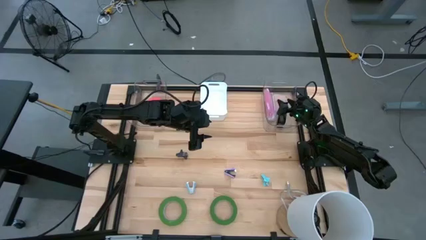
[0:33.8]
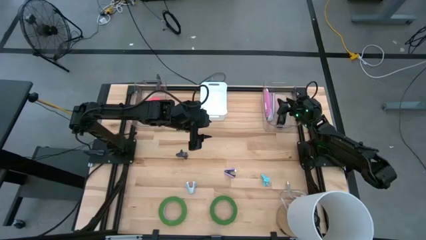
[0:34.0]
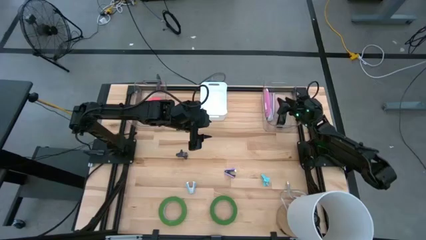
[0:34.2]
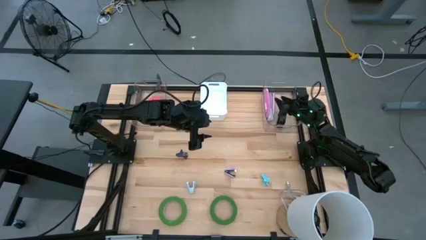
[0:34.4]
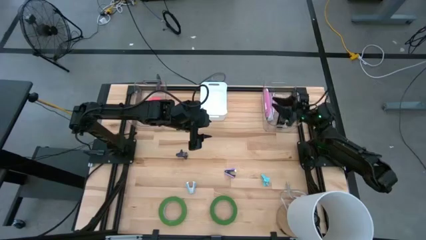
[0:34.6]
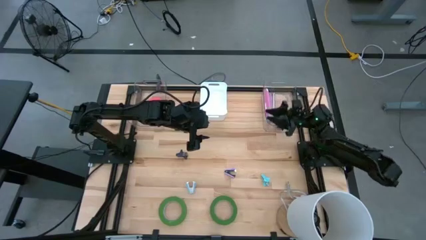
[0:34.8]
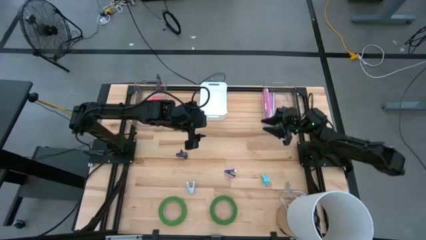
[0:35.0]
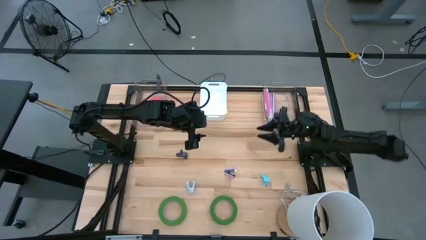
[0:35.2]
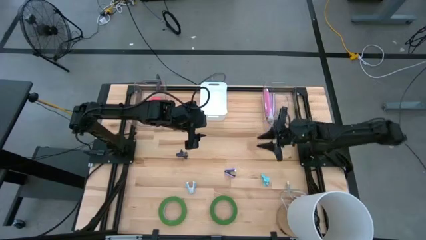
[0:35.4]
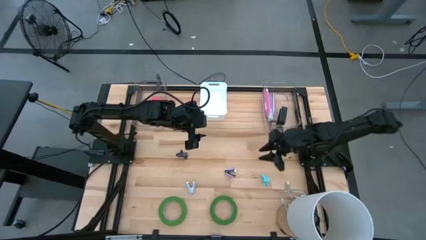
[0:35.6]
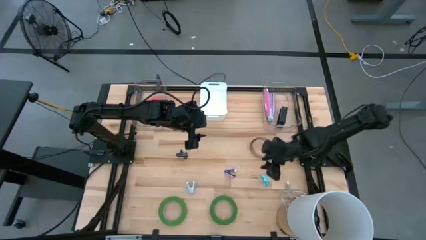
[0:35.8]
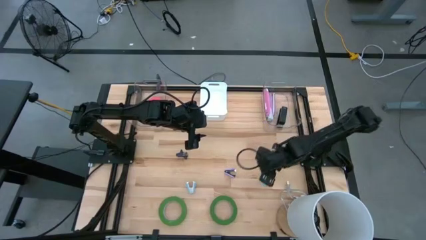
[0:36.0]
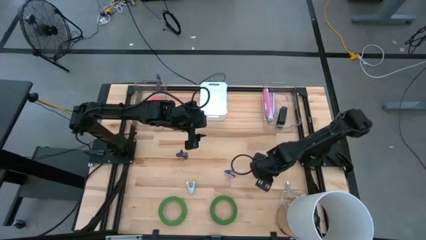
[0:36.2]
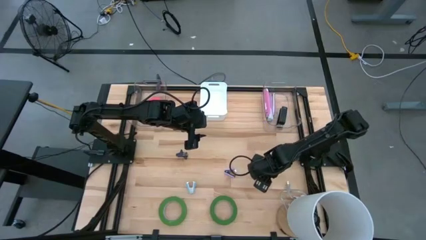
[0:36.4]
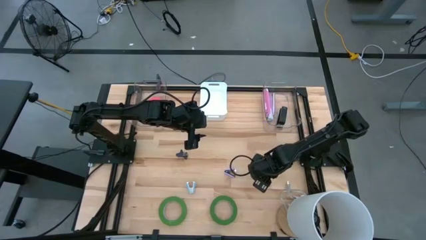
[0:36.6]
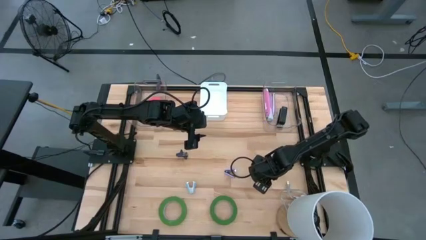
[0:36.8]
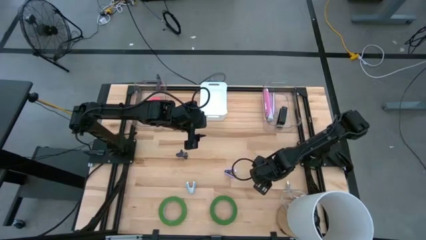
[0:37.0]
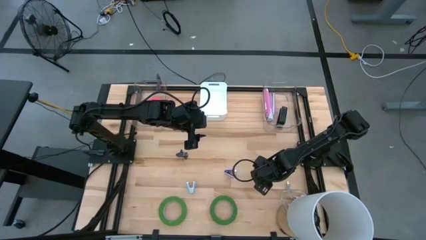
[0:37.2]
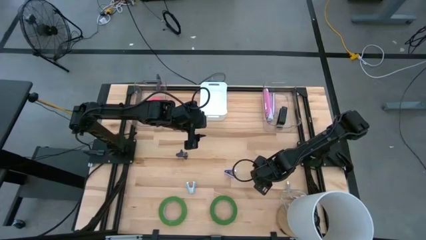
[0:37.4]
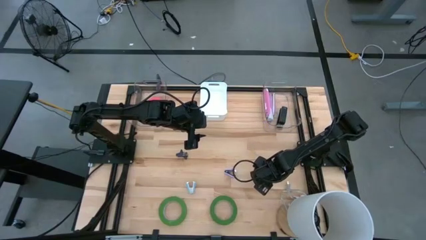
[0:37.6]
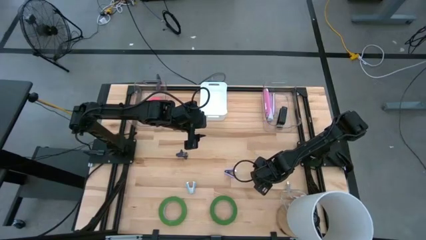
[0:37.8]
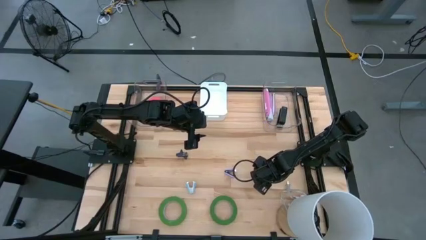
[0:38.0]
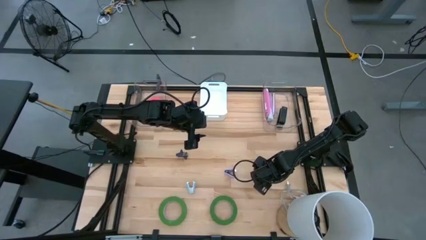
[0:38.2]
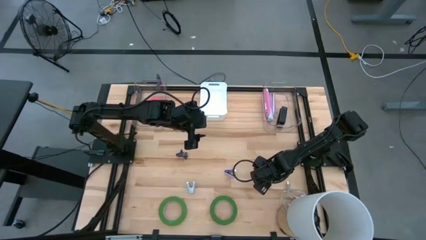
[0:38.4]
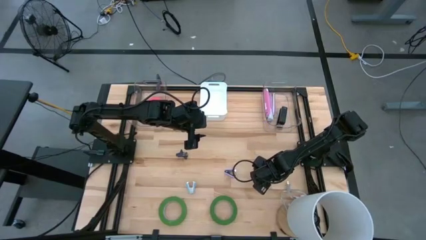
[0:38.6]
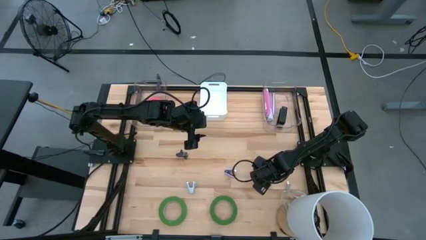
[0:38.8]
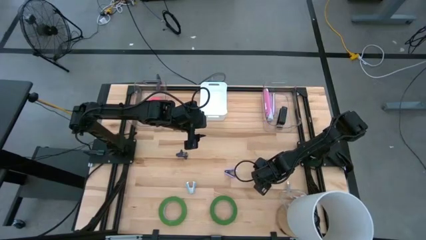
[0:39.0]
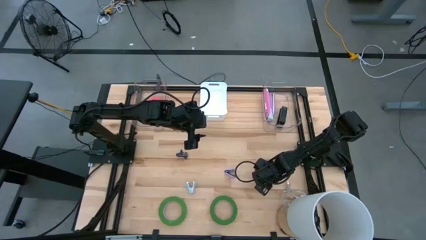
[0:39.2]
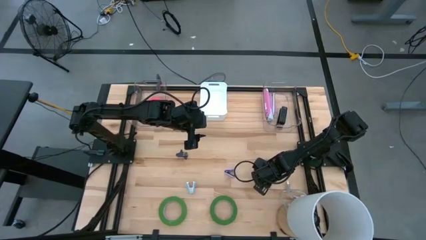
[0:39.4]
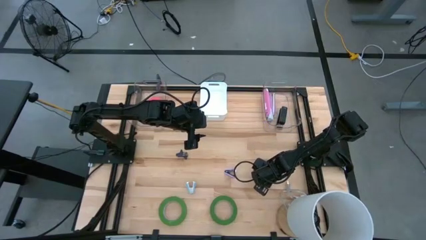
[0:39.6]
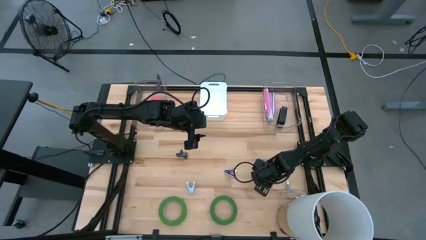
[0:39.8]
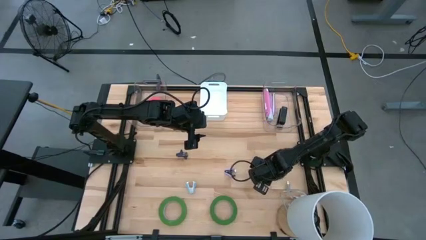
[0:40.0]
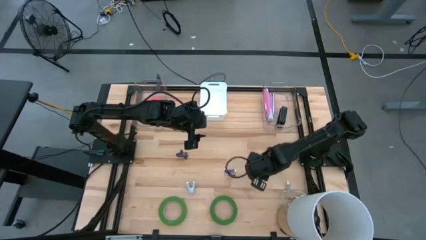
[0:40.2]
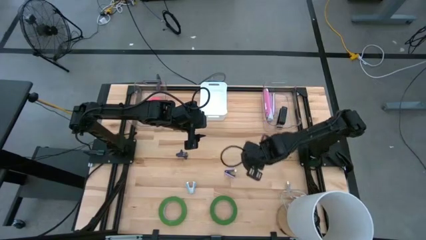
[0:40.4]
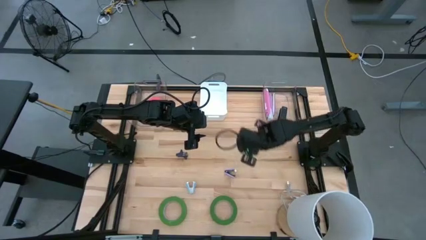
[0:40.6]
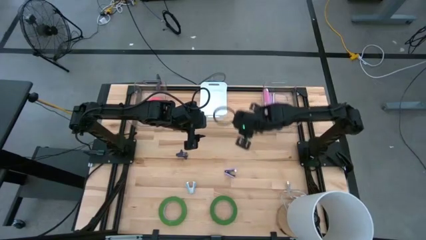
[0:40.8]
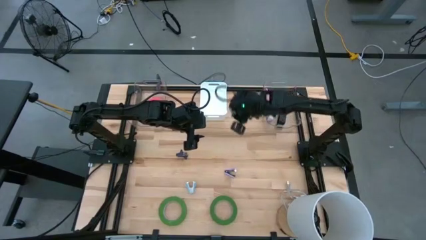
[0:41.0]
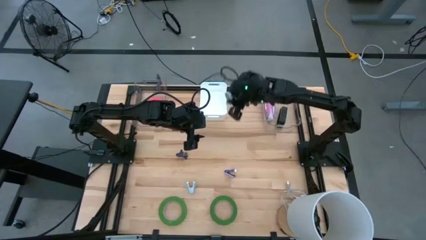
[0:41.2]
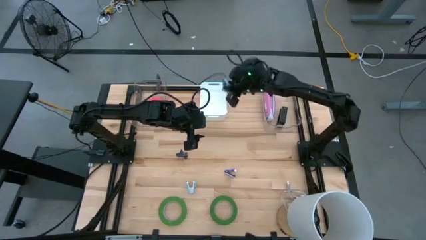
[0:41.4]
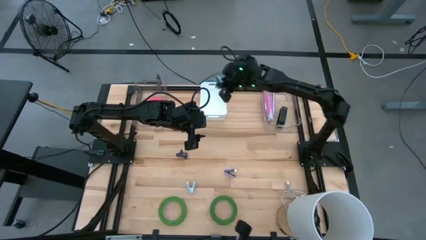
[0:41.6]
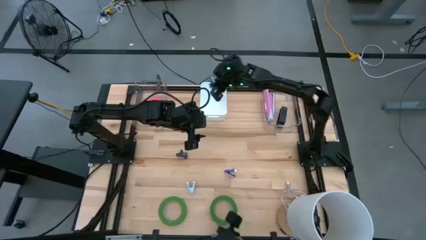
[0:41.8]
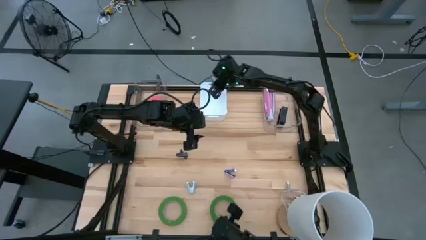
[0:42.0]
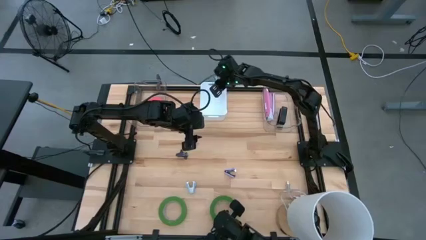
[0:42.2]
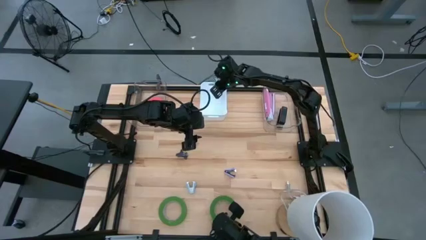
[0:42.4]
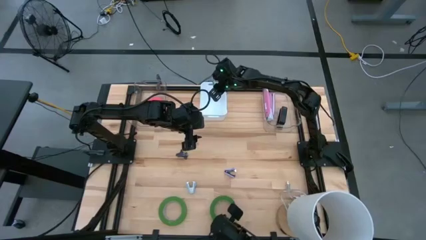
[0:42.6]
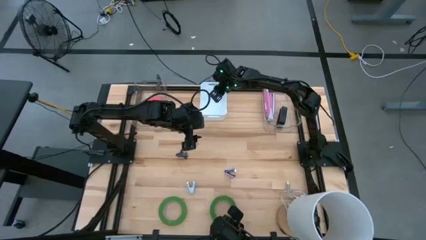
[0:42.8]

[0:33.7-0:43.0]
Task: Pick and place Stapler, Stapler remover, tape
Put the right light blue staple remover into the white bin

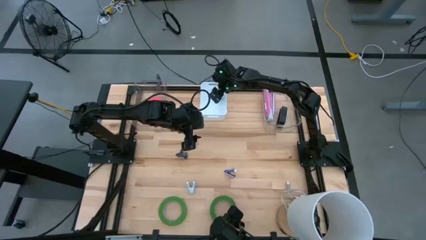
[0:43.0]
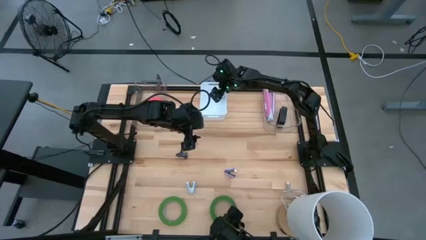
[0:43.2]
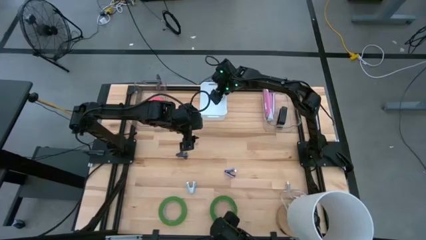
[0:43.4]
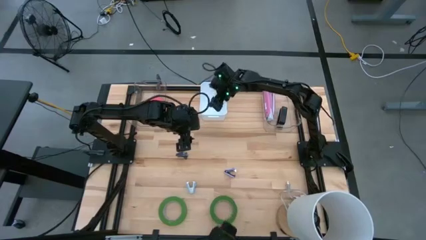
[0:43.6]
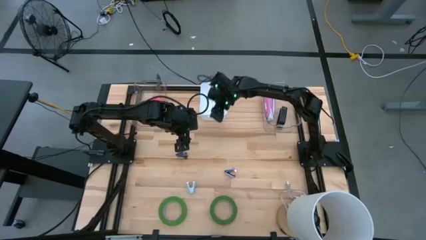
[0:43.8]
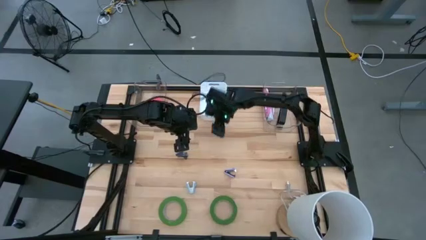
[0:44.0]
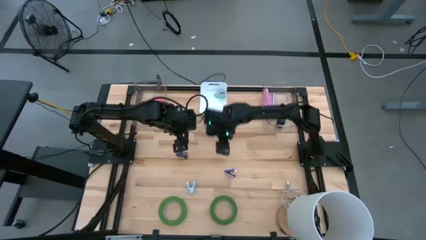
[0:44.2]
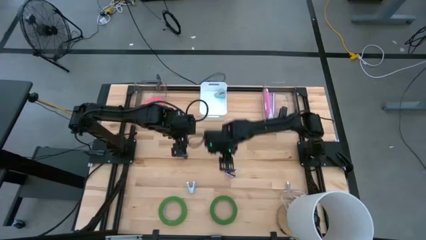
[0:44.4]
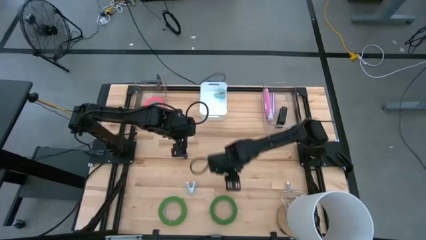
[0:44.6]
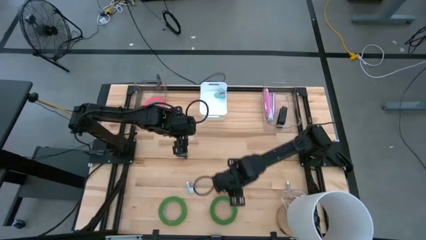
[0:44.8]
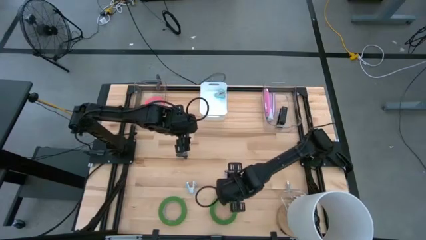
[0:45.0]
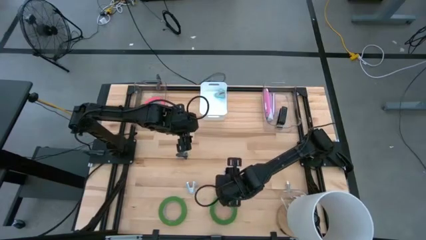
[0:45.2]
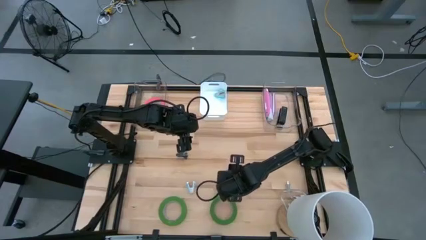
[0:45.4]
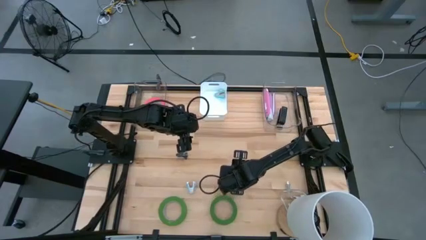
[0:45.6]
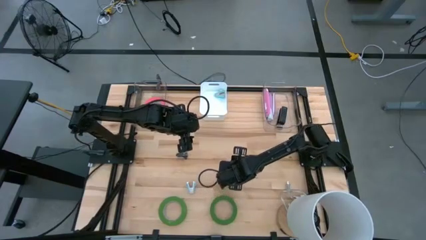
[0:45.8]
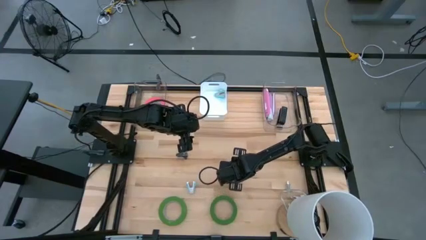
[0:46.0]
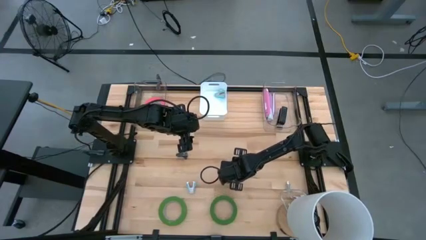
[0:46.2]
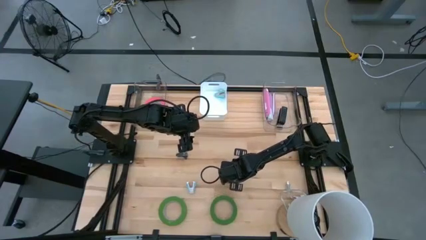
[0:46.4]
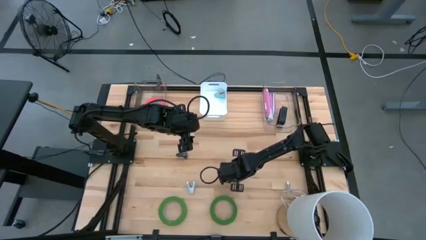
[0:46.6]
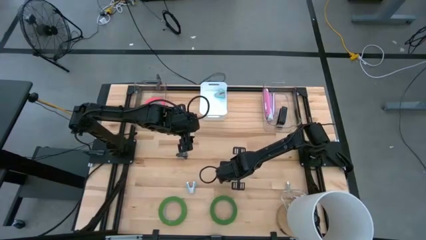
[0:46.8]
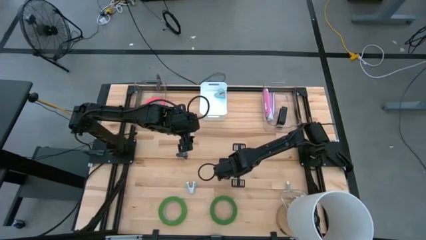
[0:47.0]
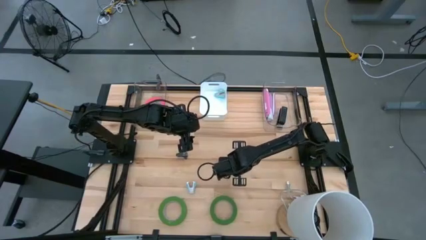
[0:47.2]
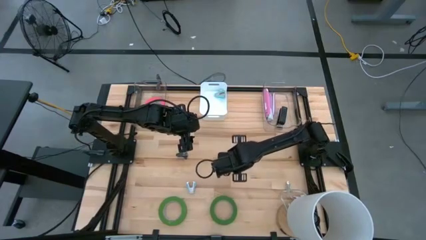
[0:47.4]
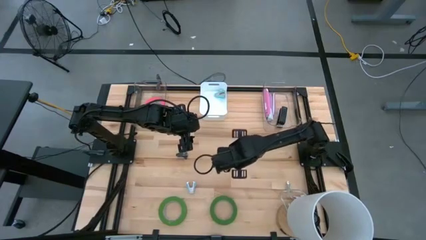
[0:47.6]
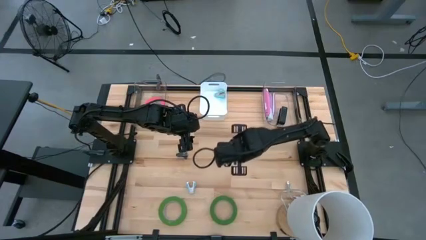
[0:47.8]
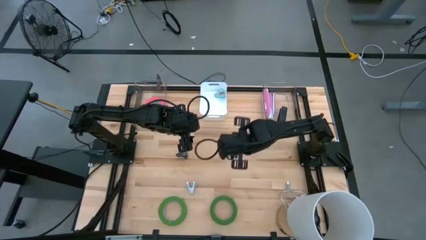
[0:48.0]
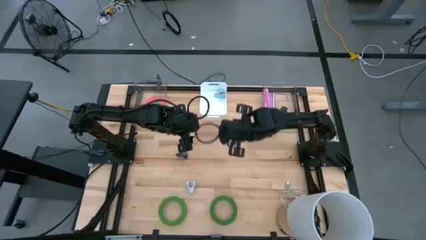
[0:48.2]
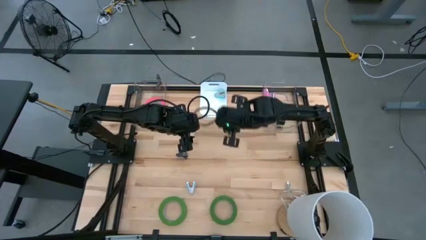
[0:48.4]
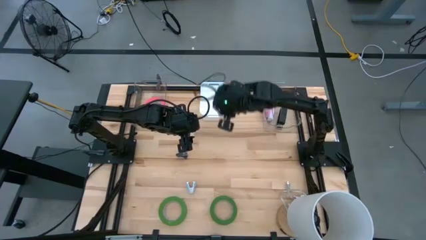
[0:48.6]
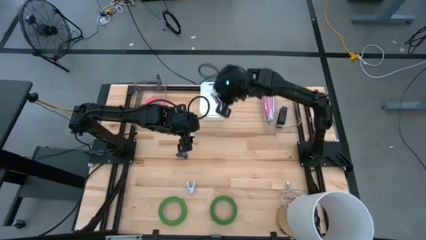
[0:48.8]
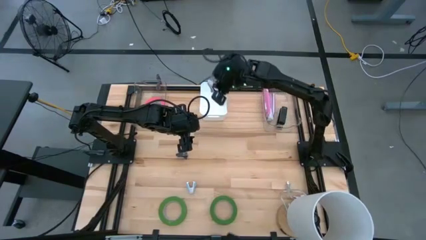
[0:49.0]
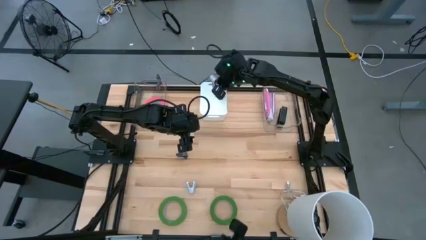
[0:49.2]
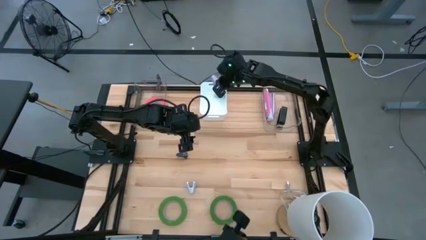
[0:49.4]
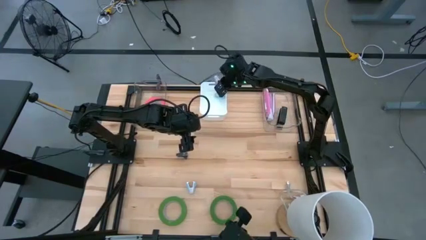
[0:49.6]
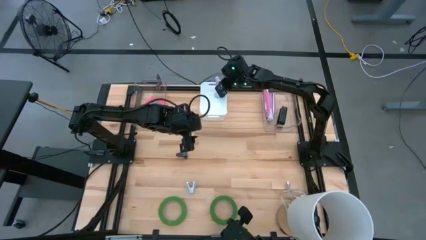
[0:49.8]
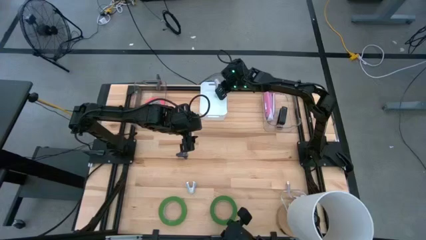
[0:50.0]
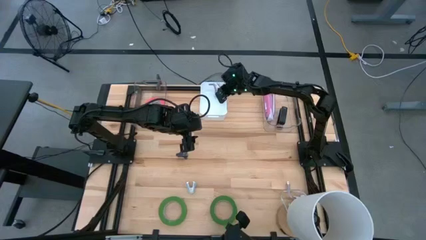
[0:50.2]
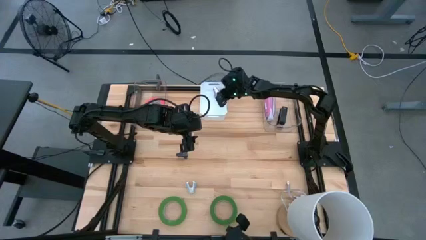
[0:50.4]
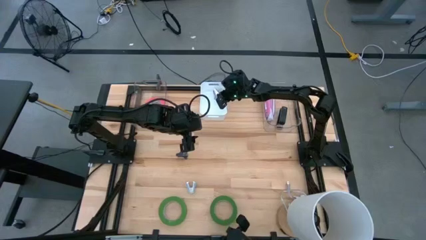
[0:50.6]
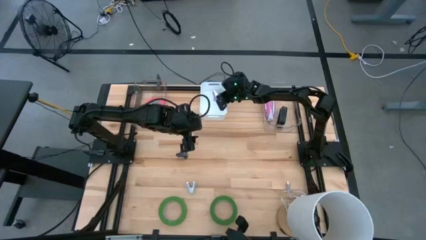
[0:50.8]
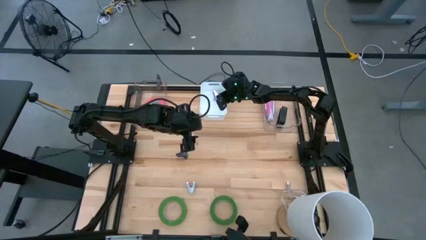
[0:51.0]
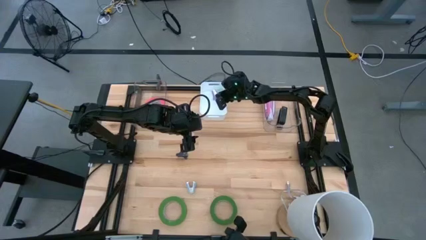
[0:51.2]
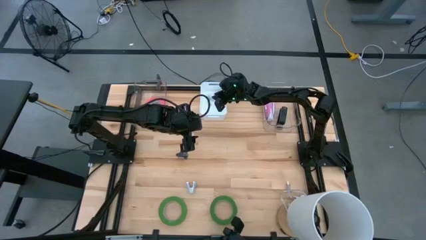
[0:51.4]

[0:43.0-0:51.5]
Put the purple staple remover into the white bin
